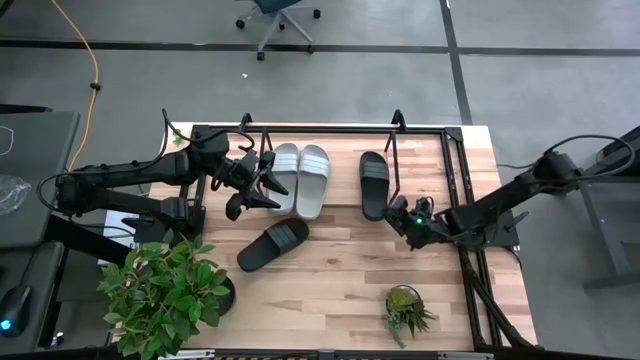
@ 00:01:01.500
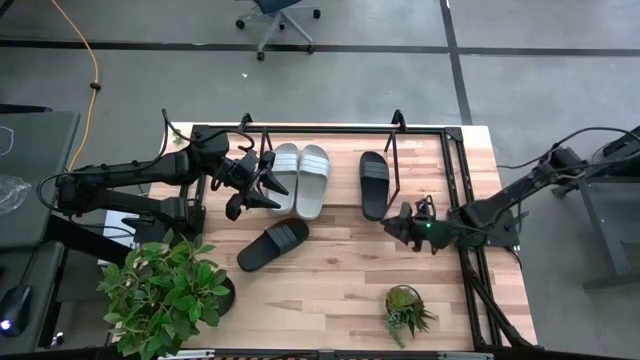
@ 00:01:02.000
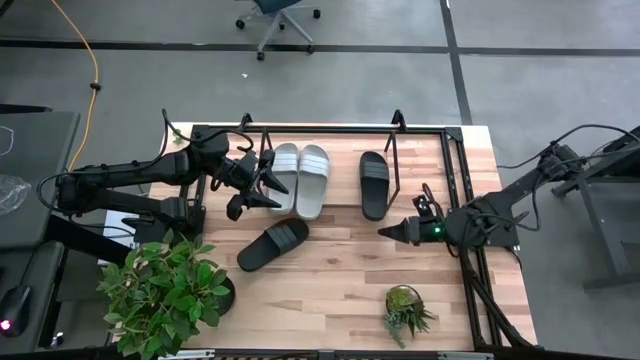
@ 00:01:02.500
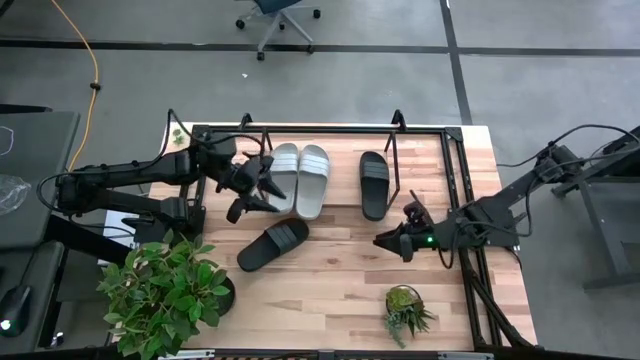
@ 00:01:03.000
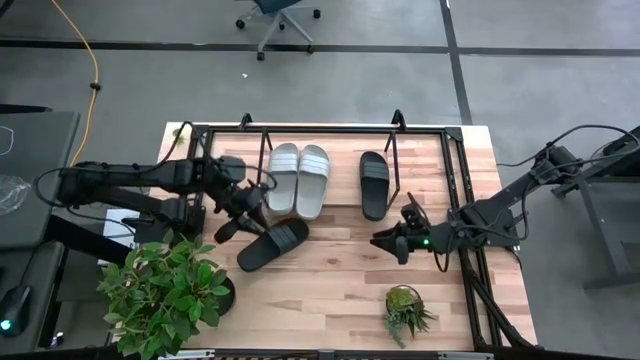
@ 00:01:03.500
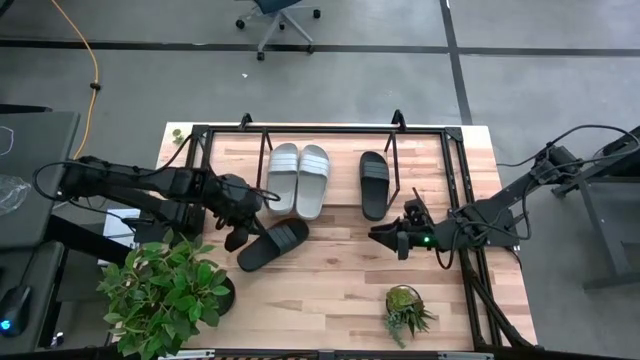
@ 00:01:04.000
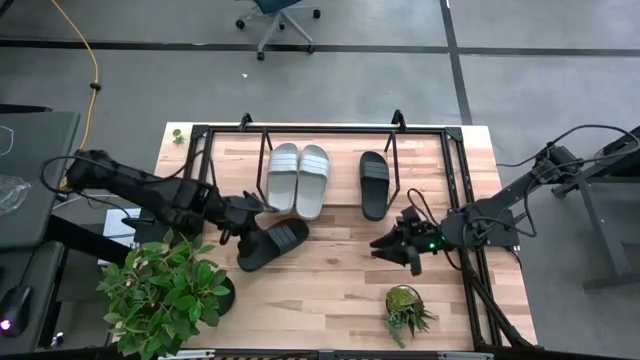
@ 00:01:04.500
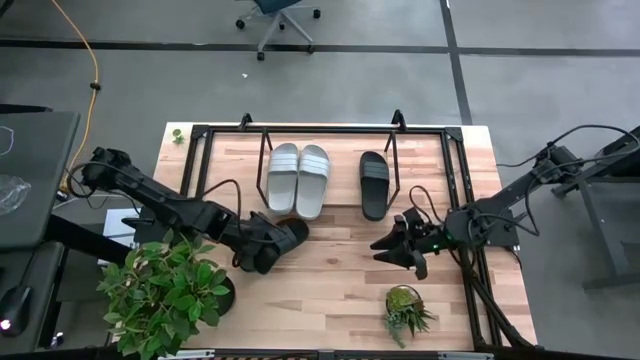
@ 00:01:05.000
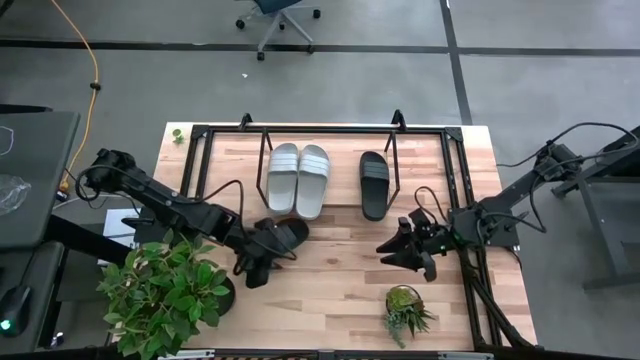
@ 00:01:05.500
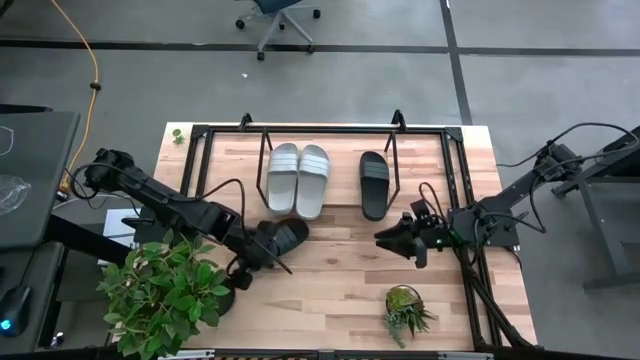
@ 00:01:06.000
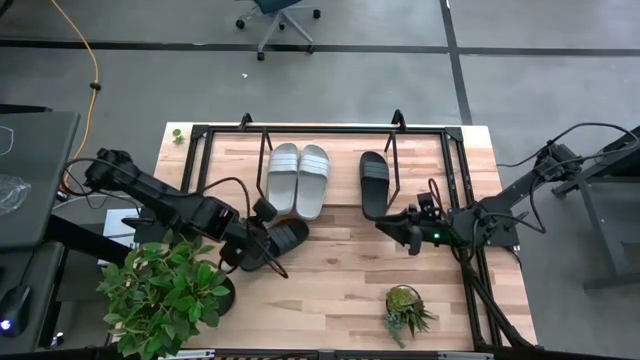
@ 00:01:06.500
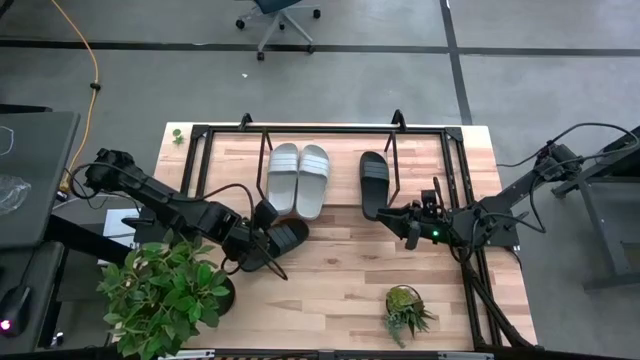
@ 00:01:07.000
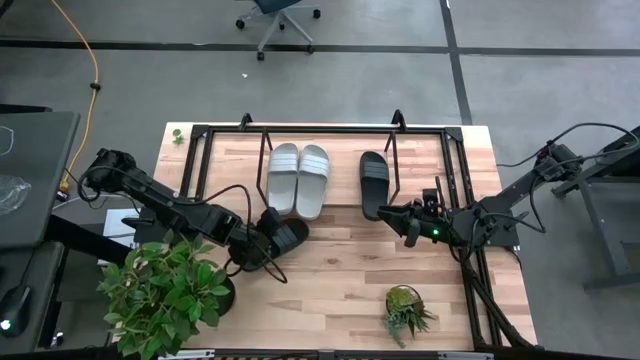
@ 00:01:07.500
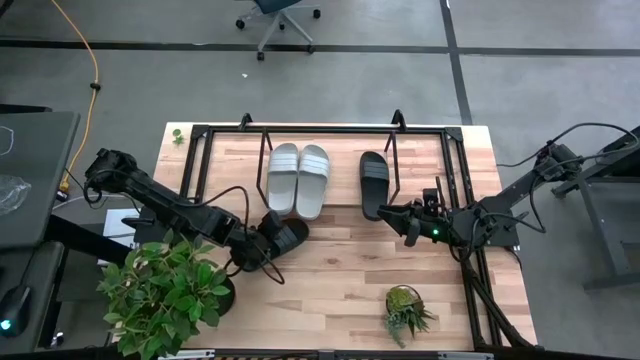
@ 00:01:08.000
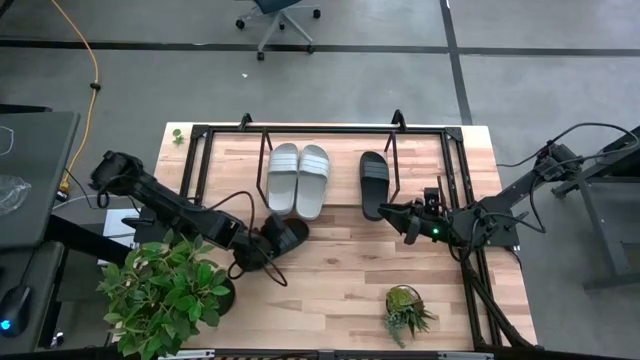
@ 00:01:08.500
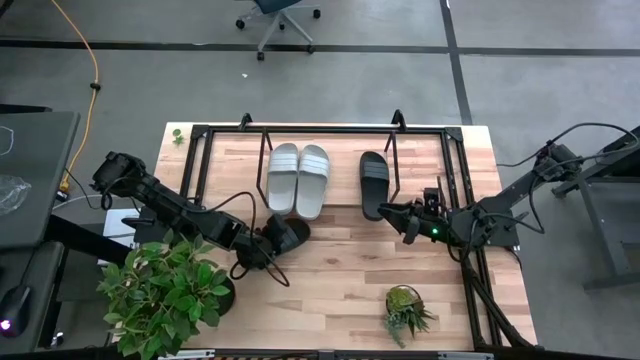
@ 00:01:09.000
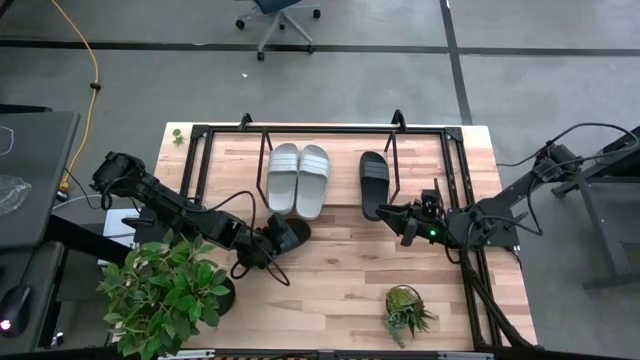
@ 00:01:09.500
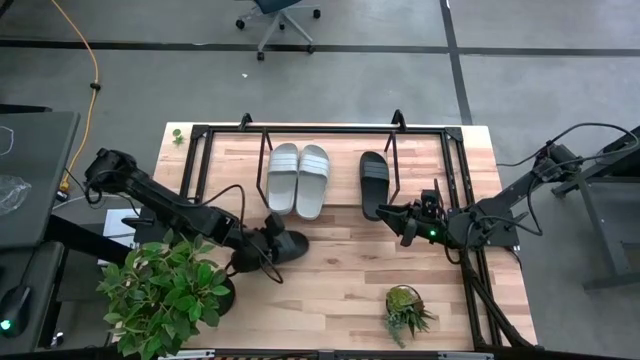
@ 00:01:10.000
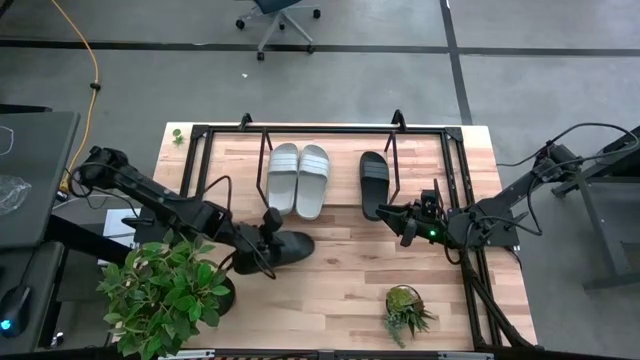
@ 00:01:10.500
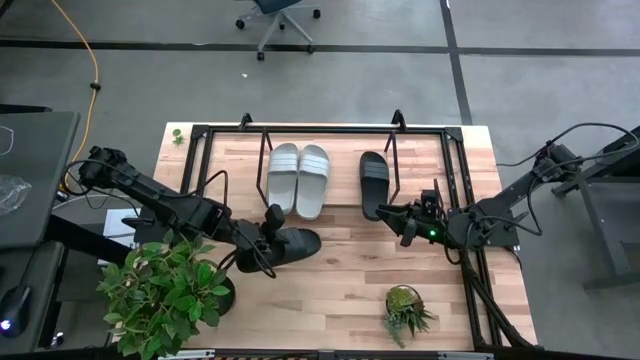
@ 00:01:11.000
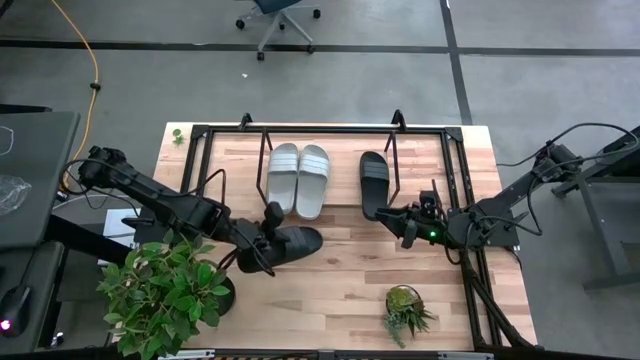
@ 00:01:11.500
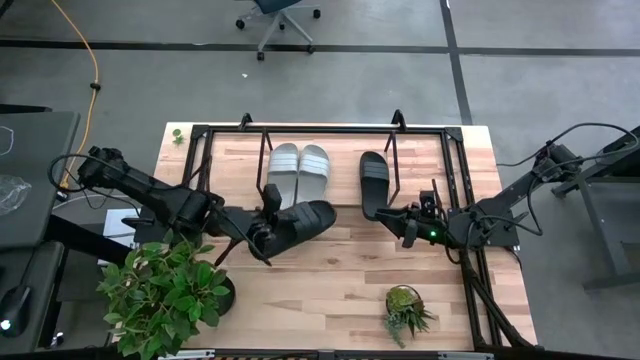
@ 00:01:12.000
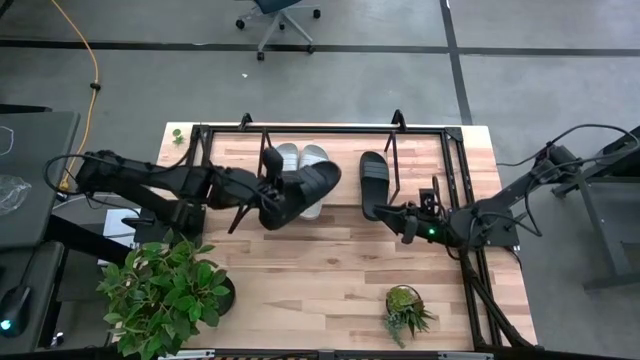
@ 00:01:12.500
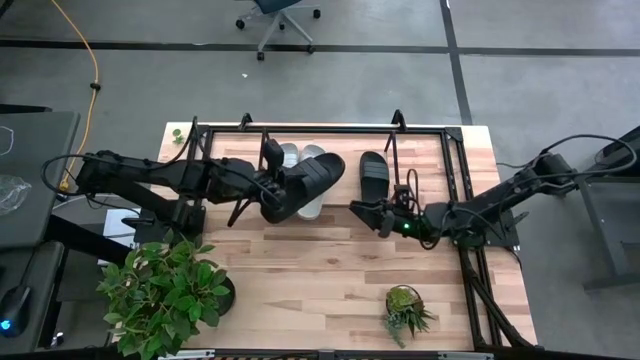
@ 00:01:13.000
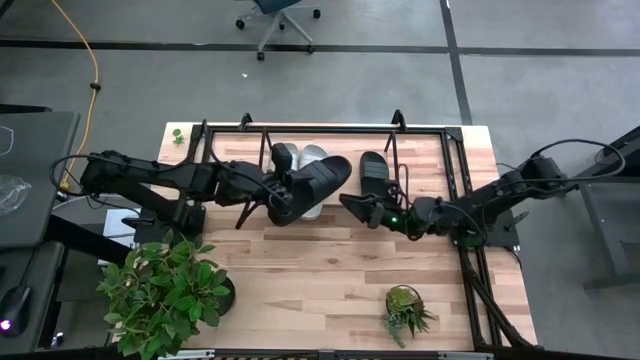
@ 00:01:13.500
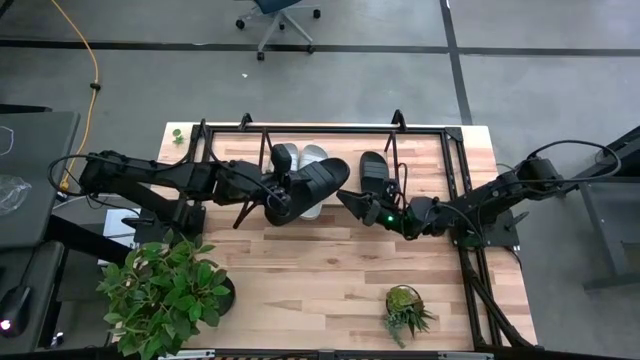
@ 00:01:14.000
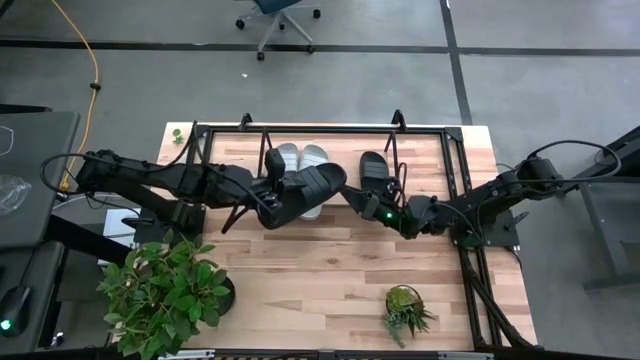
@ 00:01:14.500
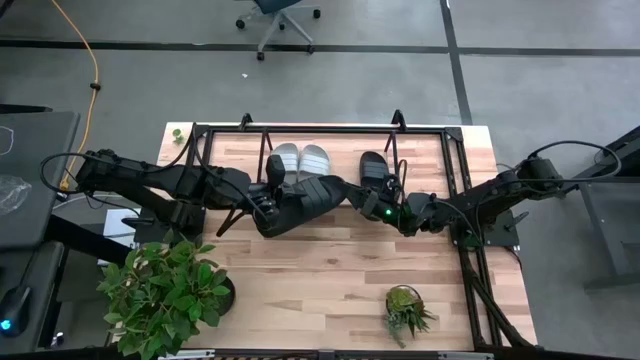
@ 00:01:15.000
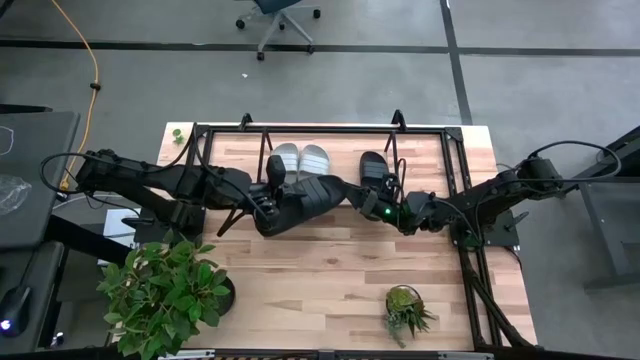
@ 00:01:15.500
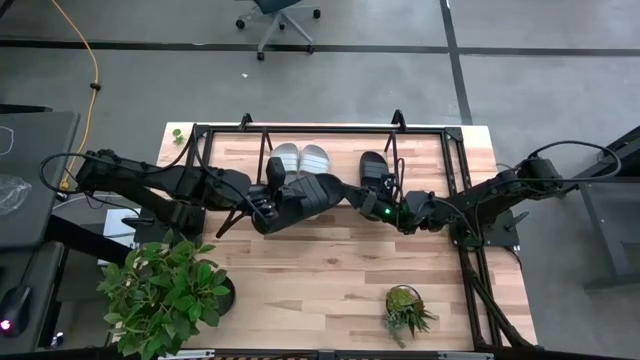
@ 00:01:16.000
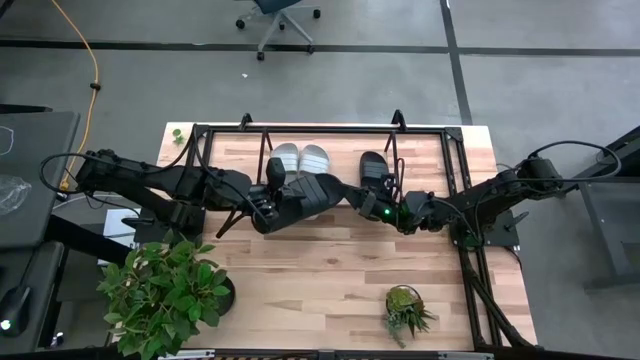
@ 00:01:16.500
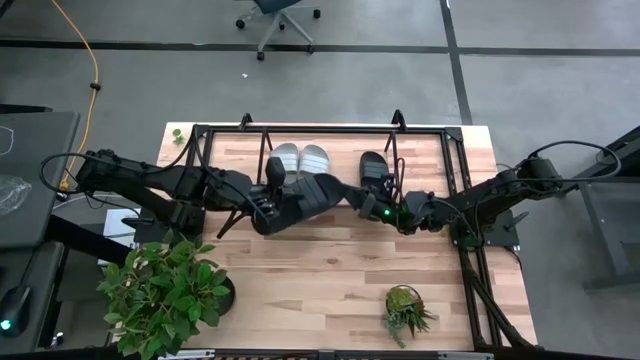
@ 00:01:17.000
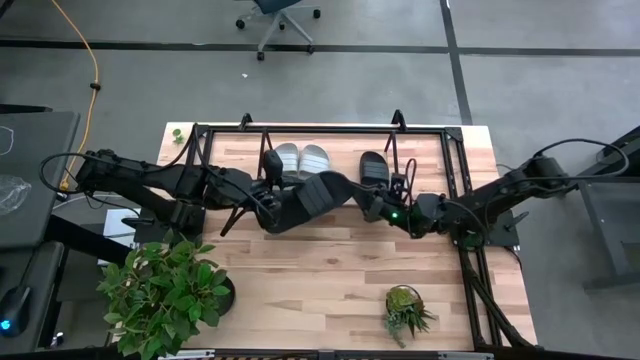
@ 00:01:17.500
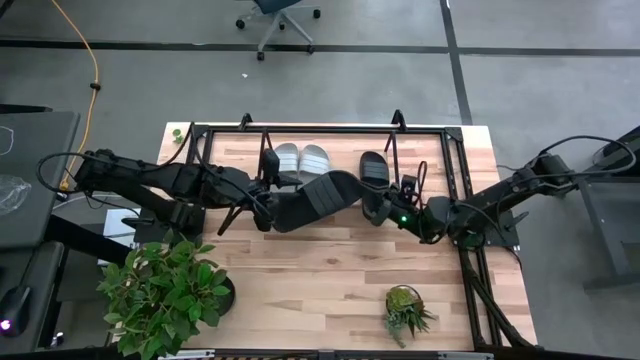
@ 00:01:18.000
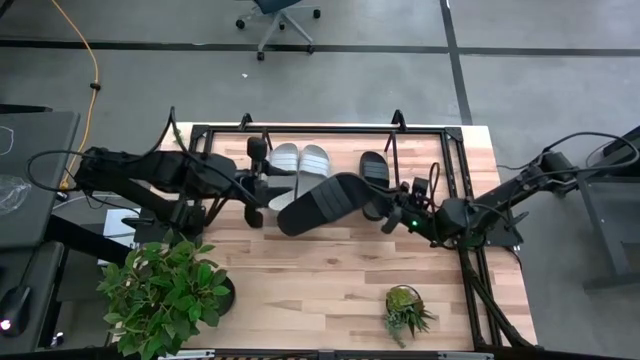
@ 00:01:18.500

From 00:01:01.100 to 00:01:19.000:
Task: Pick and place slides into the shelf
Put the black slide on the shelf

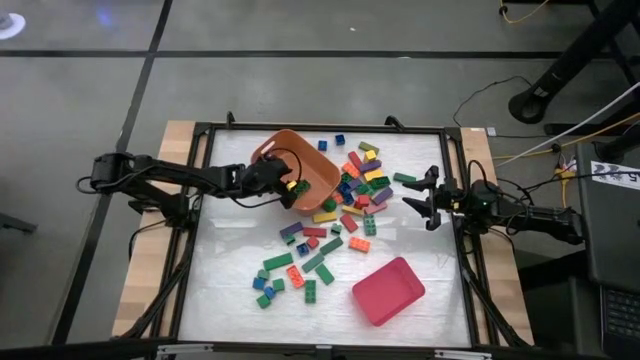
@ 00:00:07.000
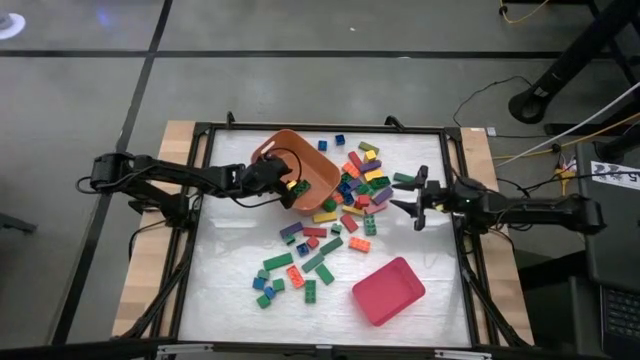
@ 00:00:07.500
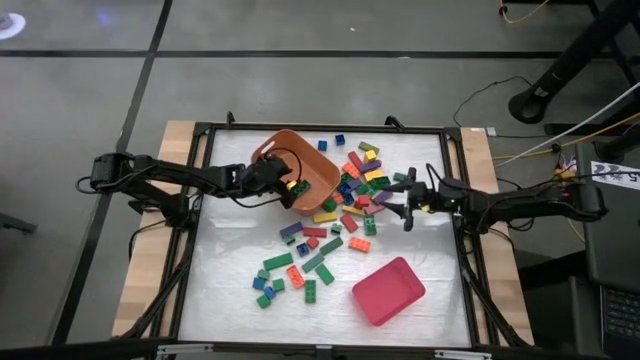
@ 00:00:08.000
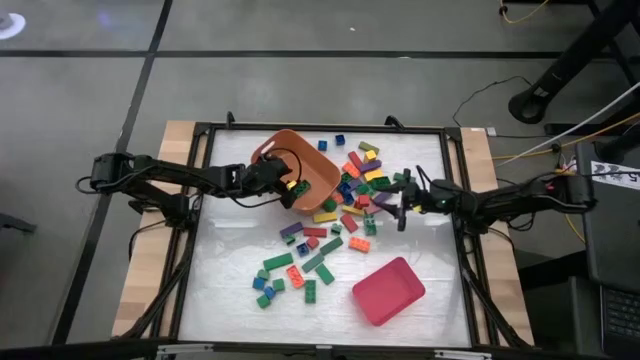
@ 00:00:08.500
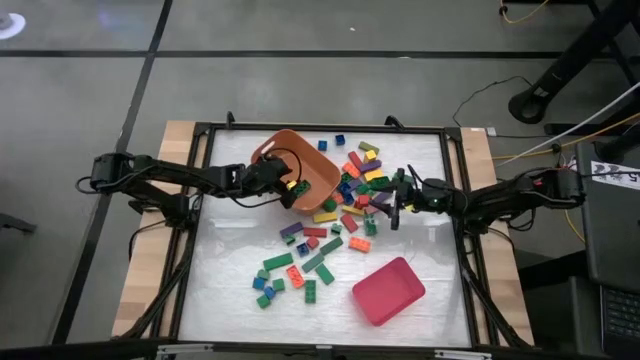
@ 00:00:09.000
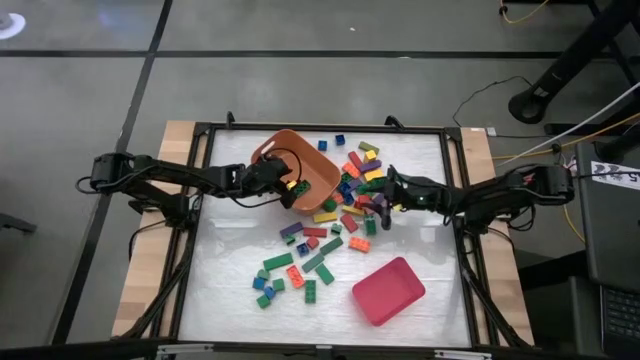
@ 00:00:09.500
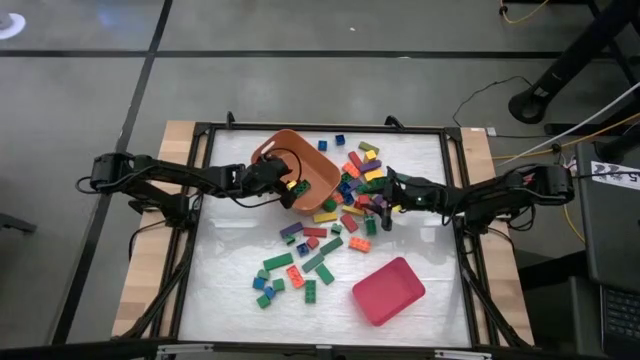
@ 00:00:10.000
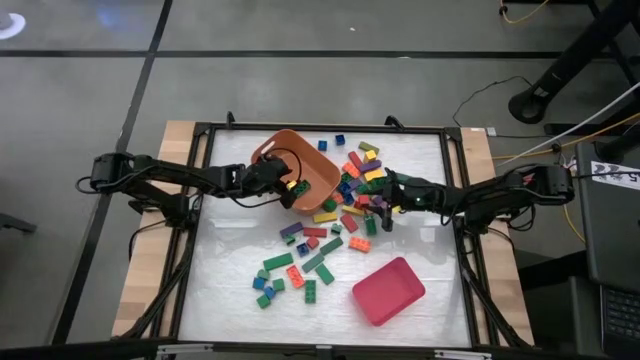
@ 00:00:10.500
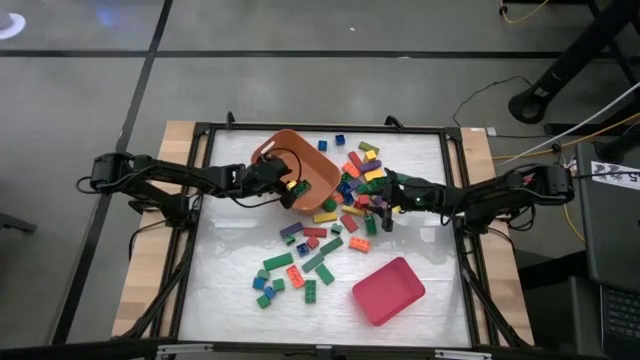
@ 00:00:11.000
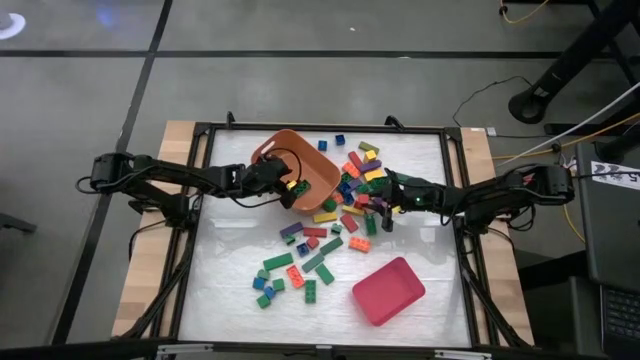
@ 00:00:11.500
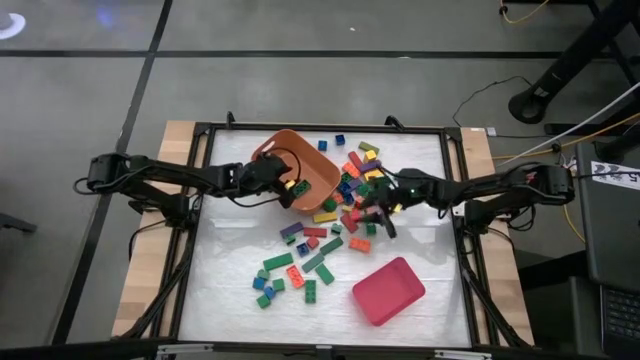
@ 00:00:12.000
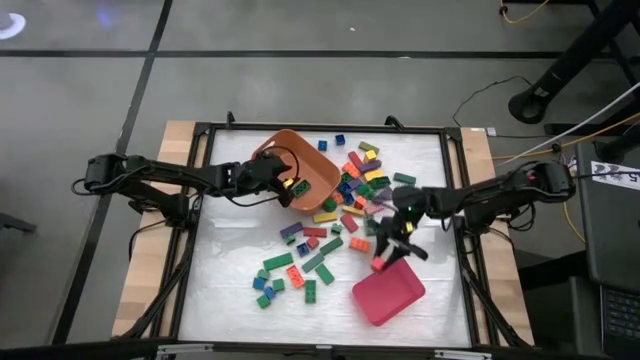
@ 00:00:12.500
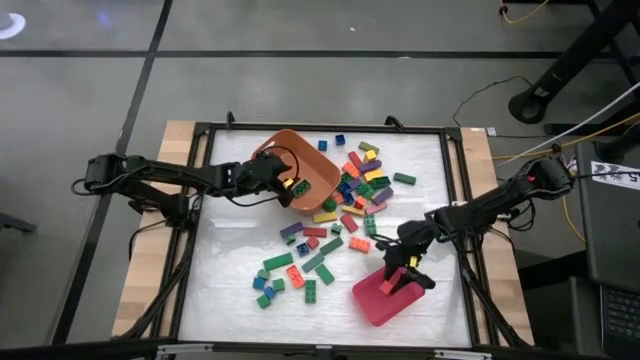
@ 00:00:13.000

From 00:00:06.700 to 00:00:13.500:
Task: Sort blocks by size
Put the small red block into the red bin
